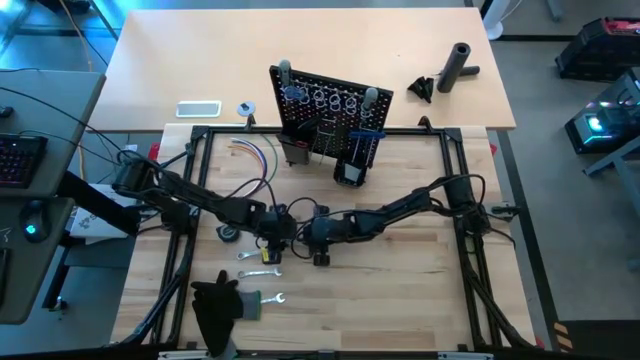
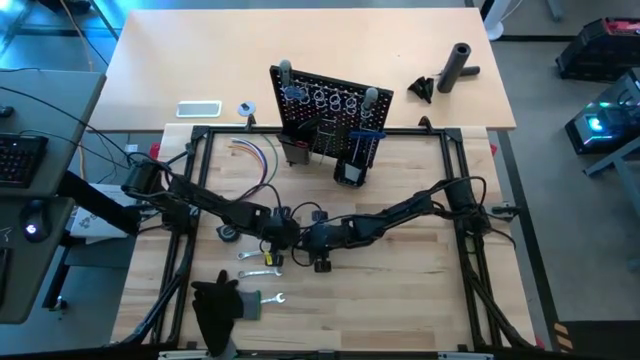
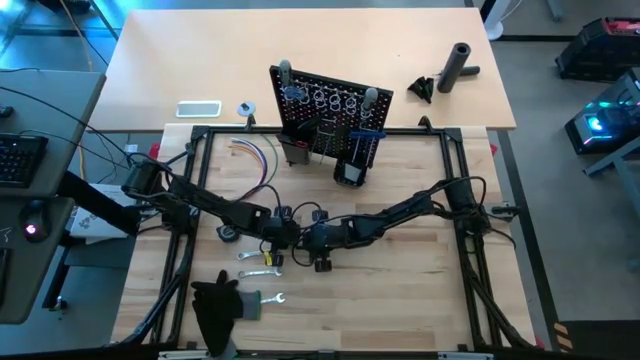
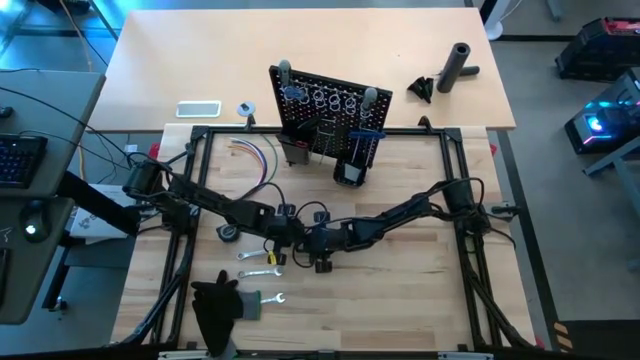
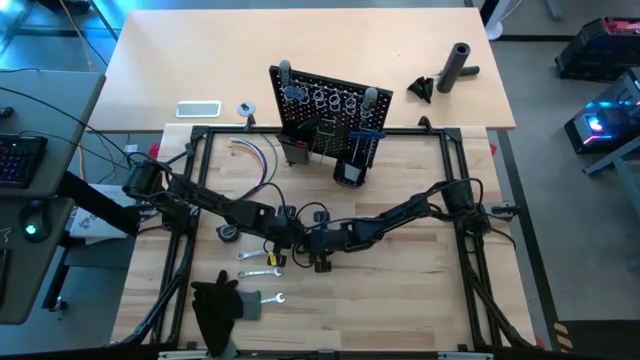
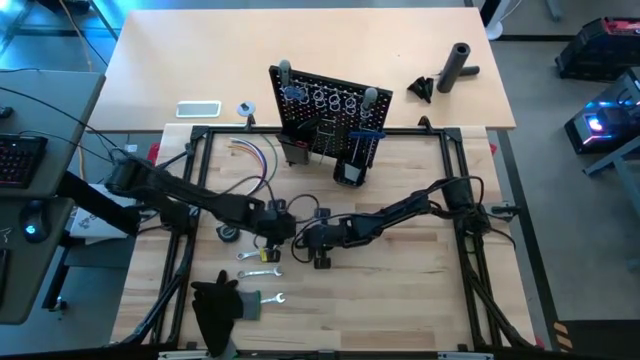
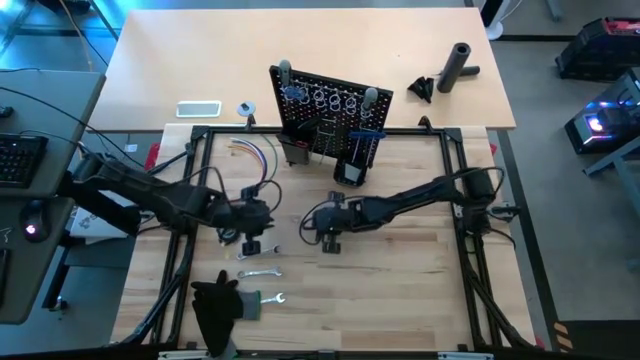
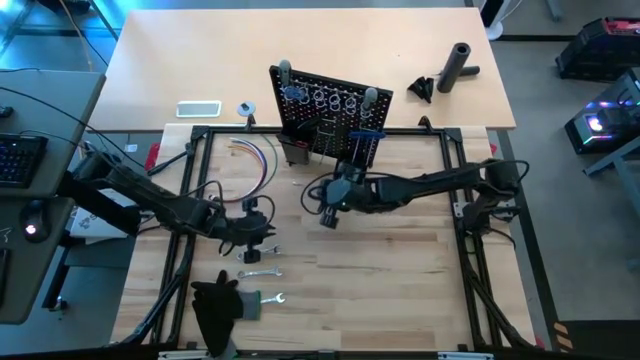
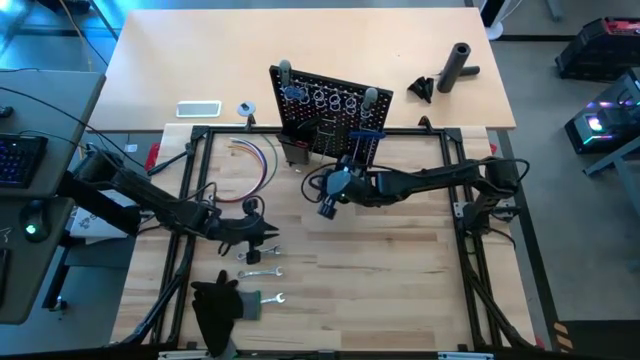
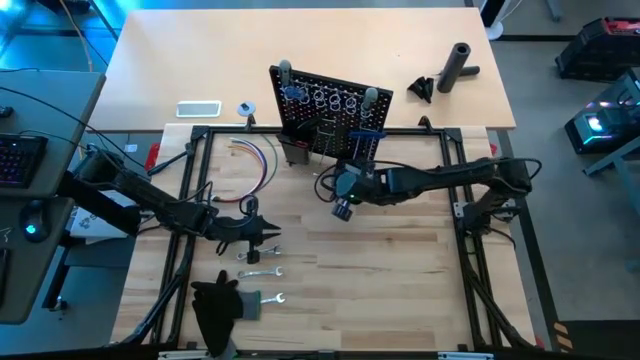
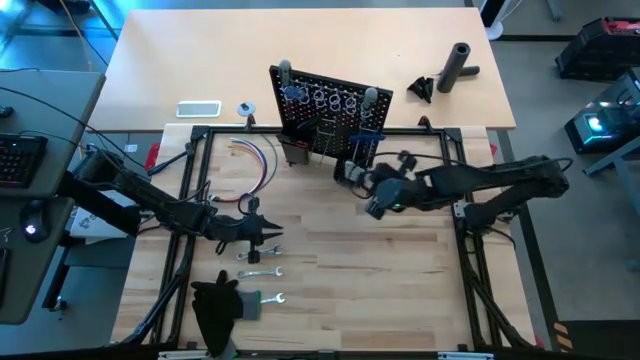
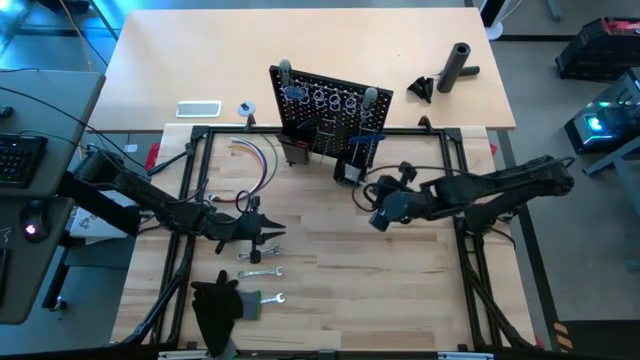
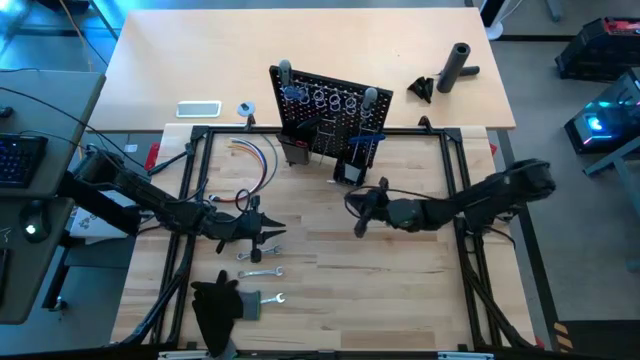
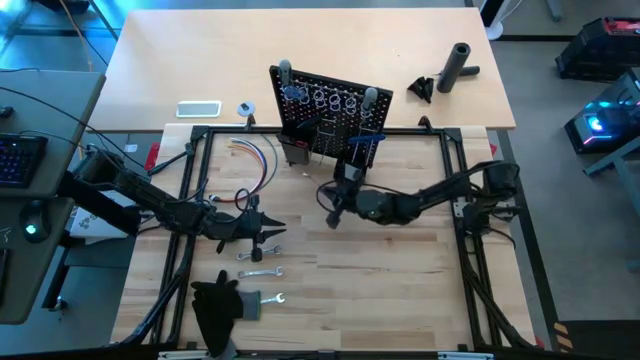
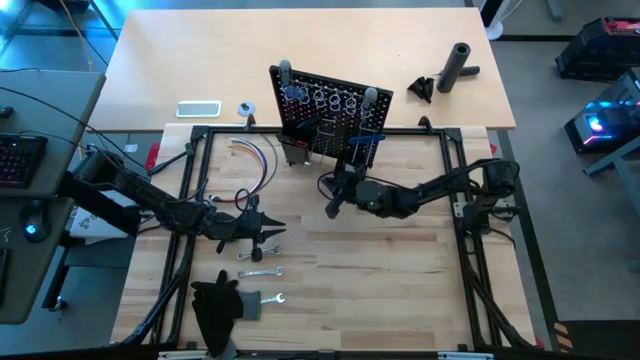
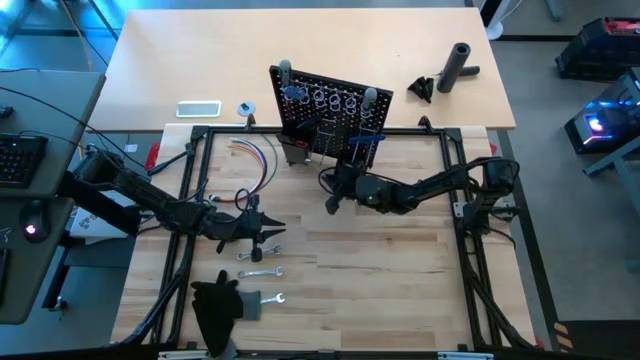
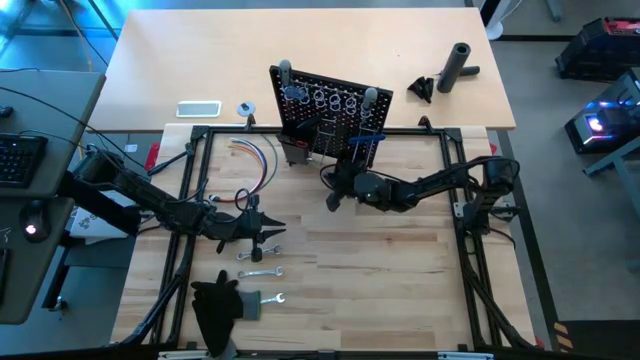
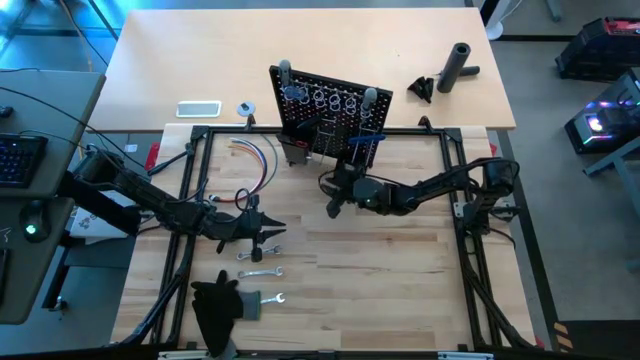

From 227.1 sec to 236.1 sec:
Task: Hang tools onto peg board
Hang the wrench on the black pegboard

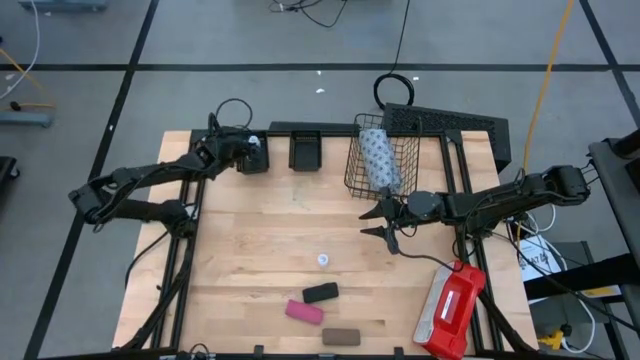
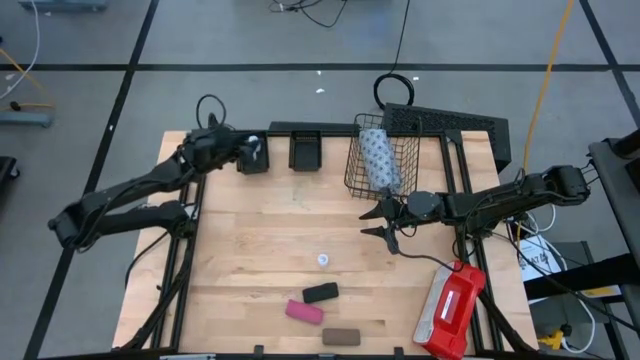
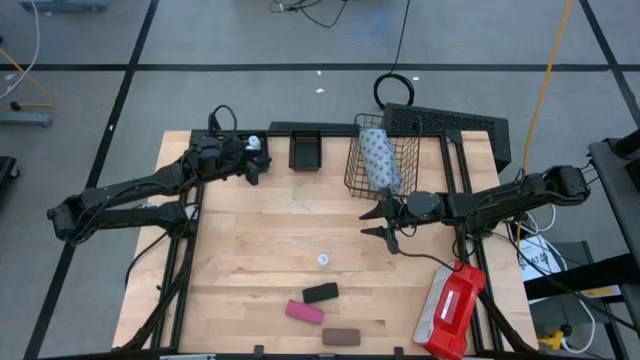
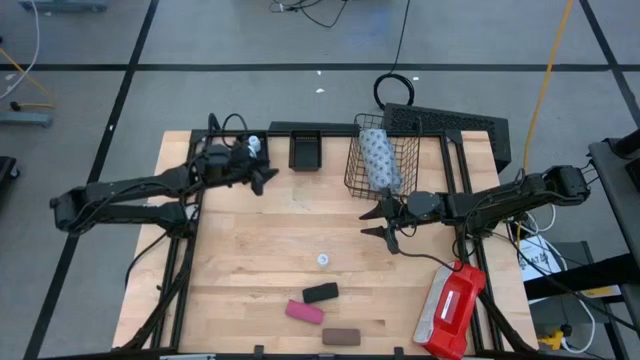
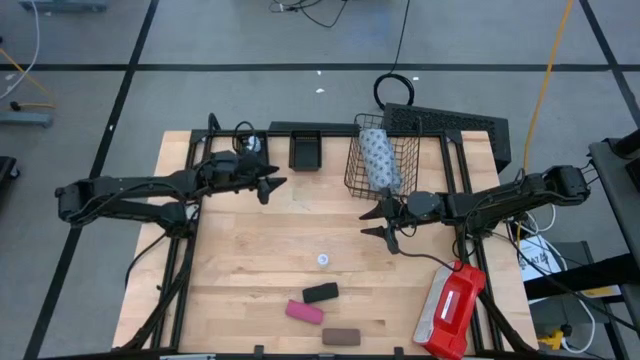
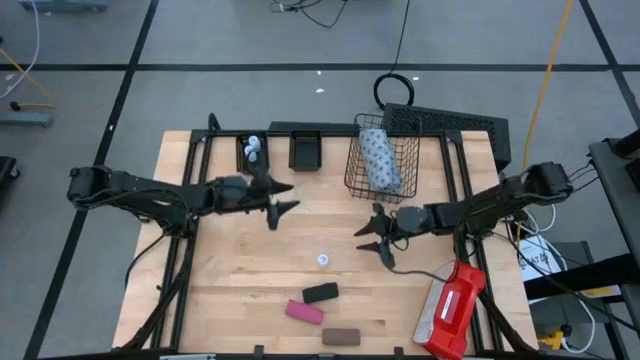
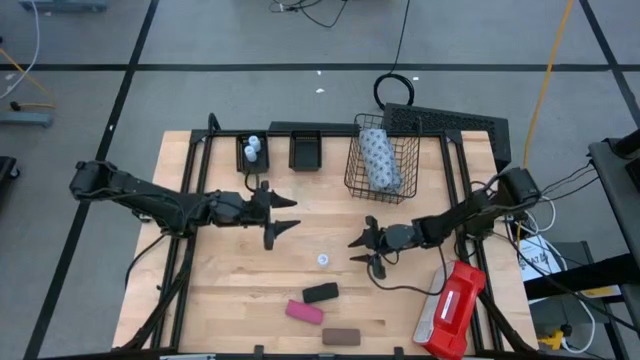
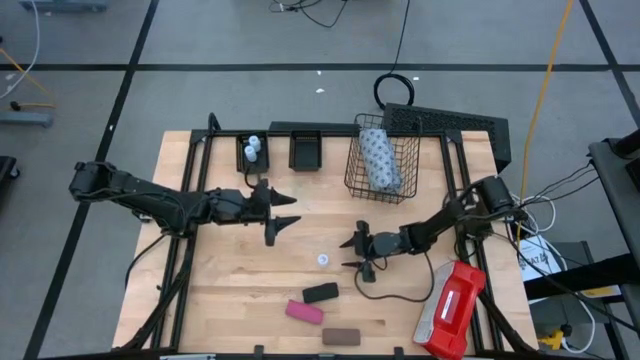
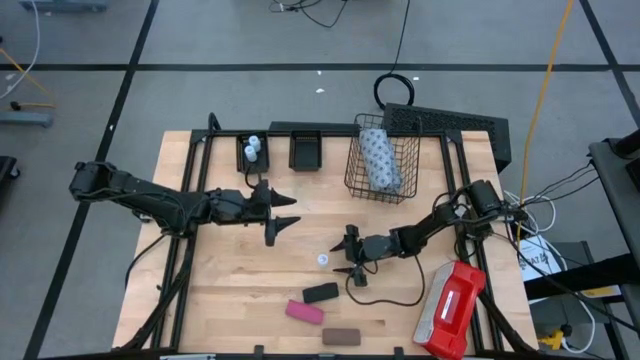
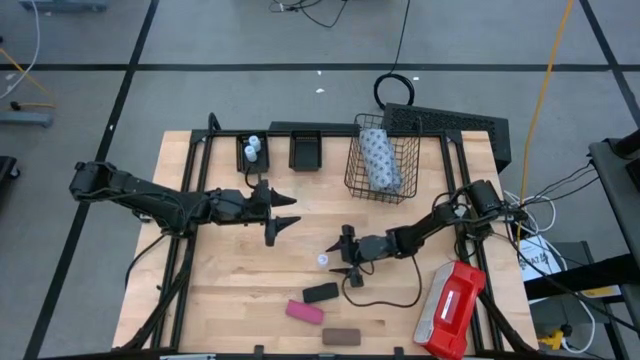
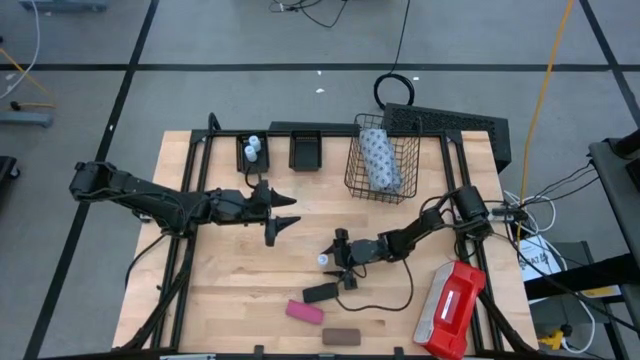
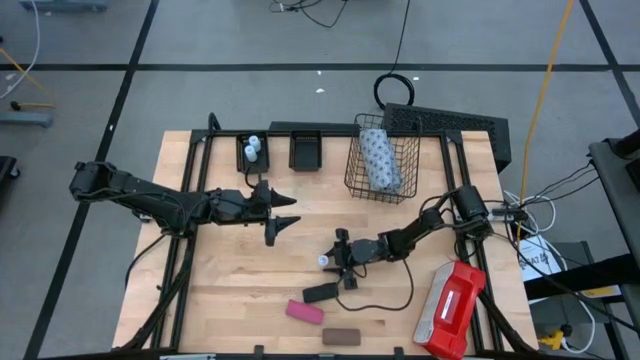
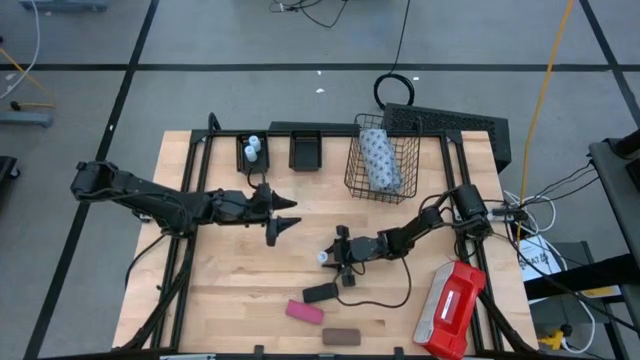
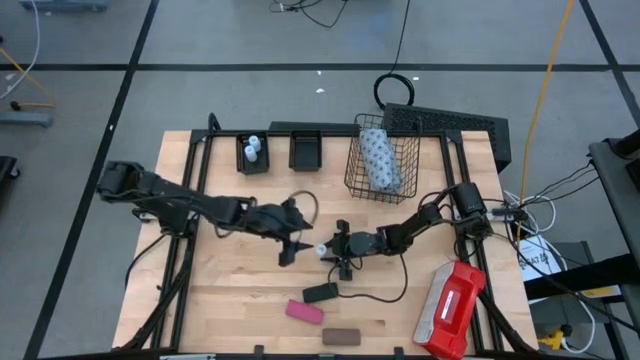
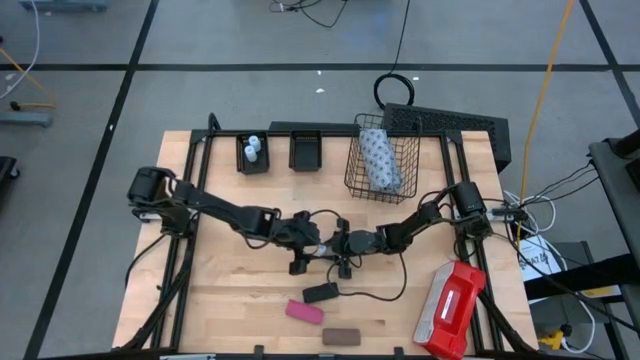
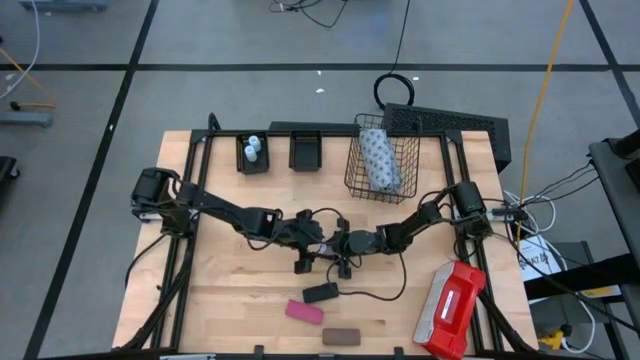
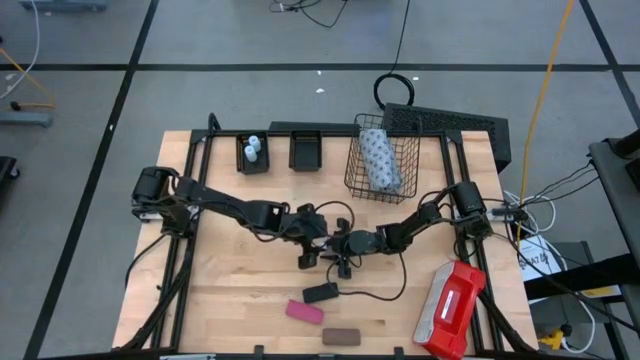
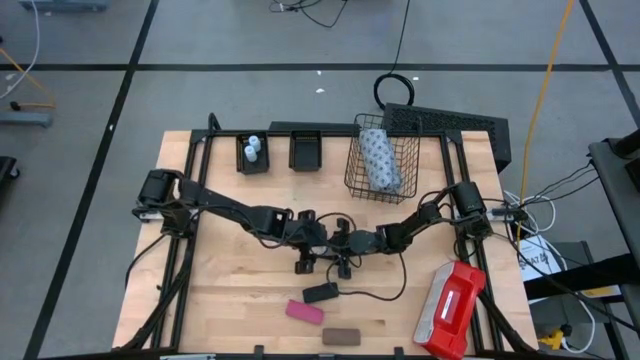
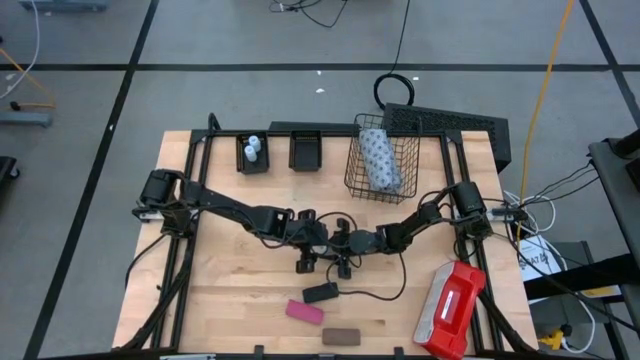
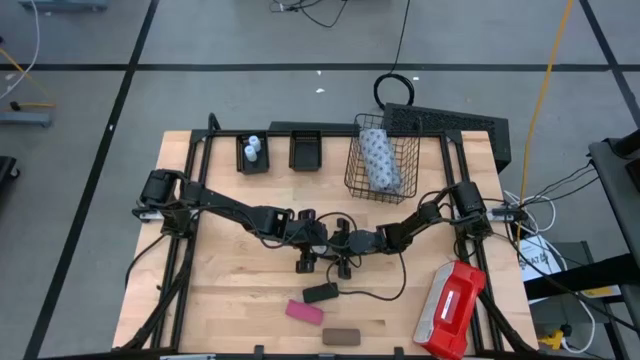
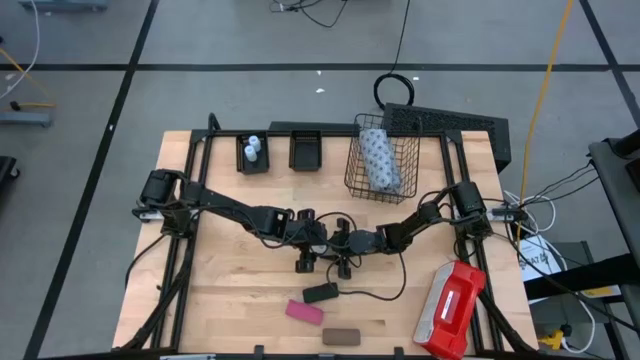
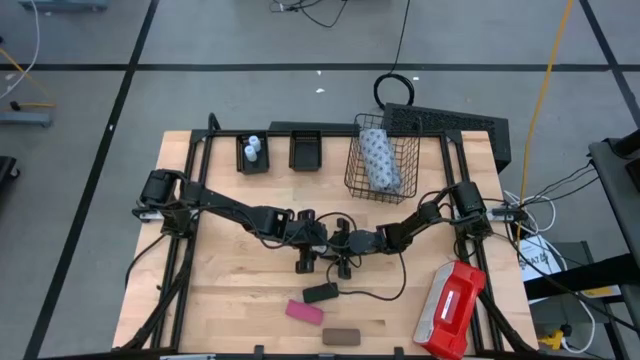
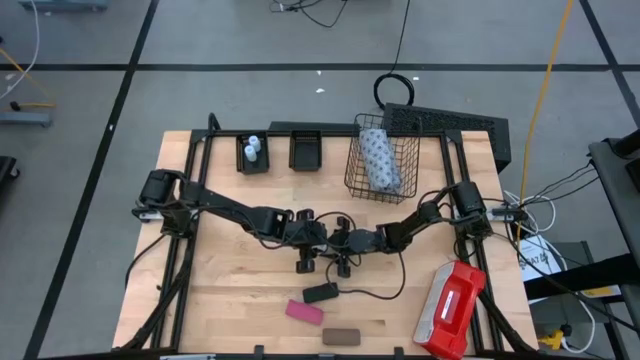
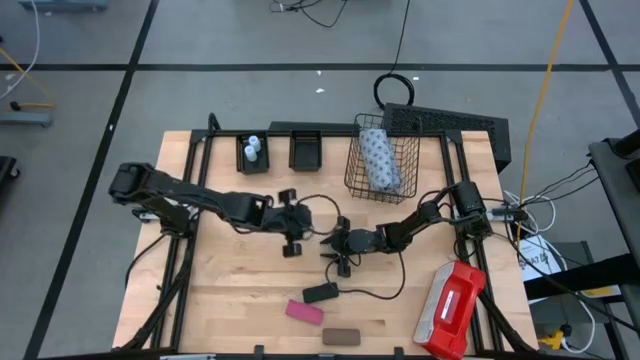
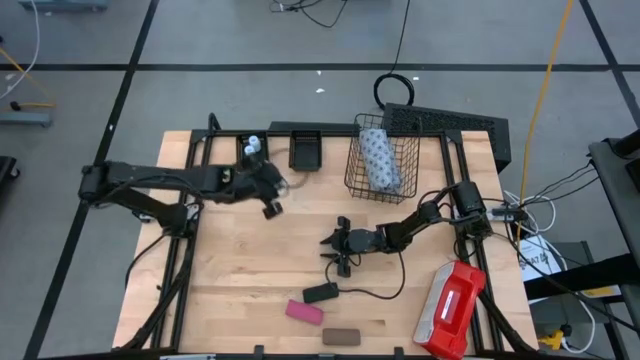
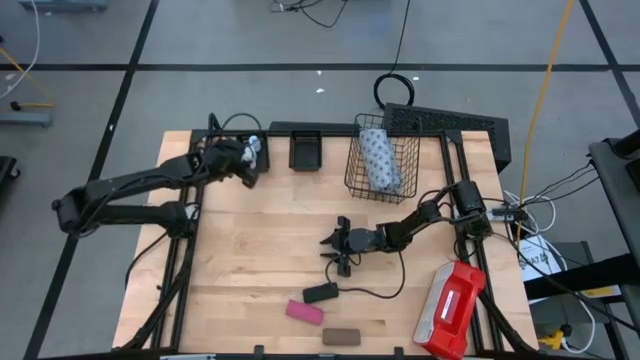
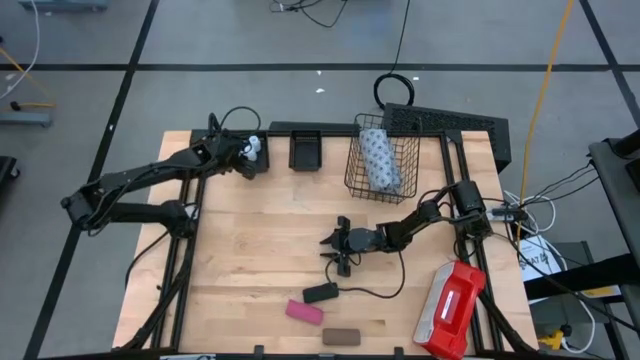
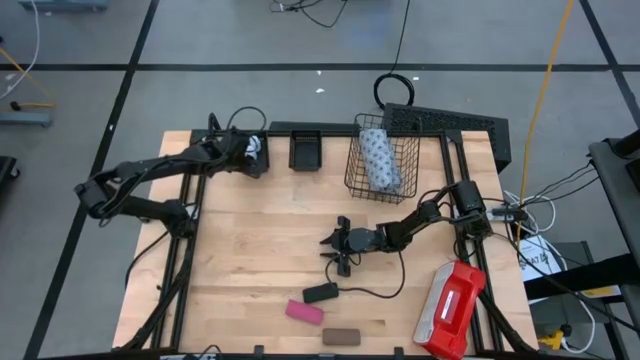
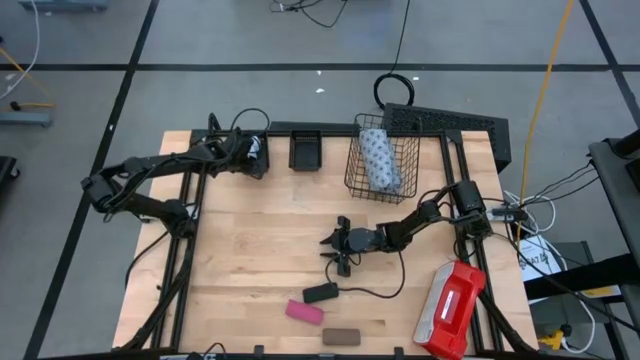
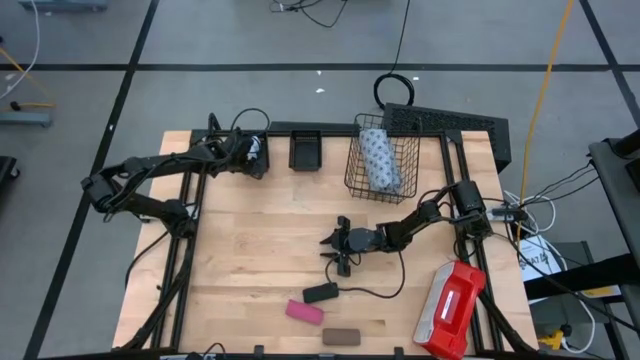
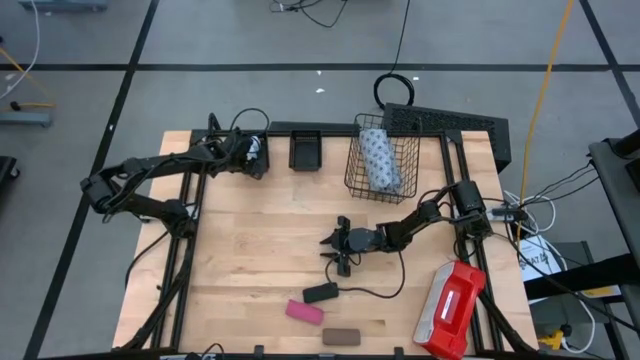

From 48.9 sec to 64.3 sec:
Task: Pick & place medical supplies in basket/bin
Put the white pill bottle into the left black basket
